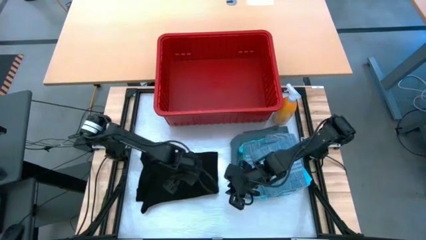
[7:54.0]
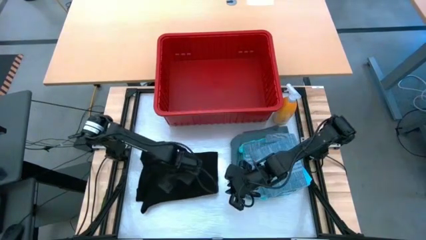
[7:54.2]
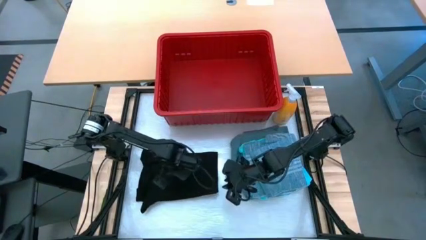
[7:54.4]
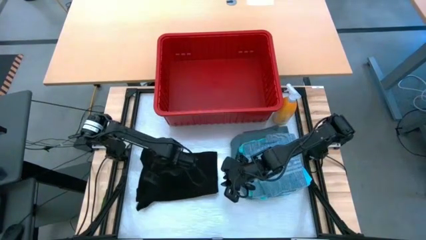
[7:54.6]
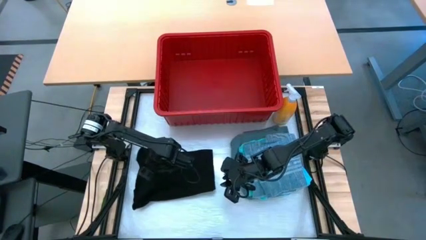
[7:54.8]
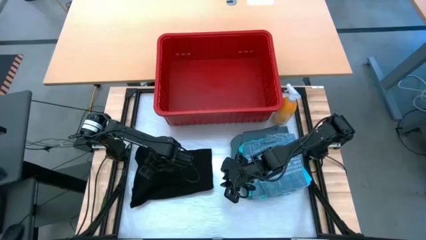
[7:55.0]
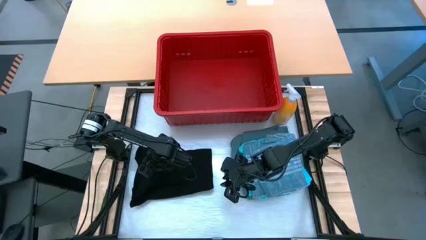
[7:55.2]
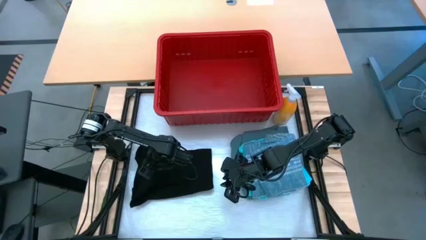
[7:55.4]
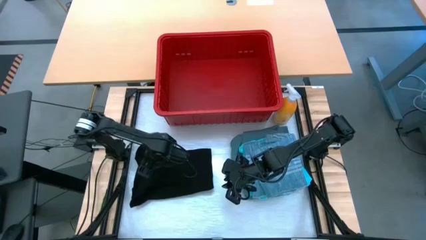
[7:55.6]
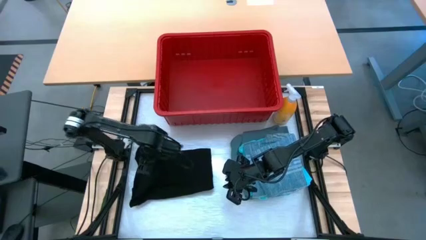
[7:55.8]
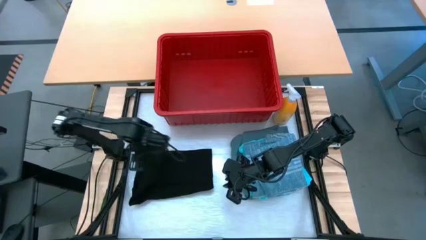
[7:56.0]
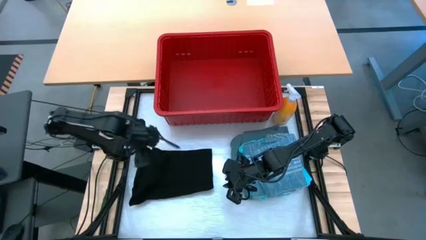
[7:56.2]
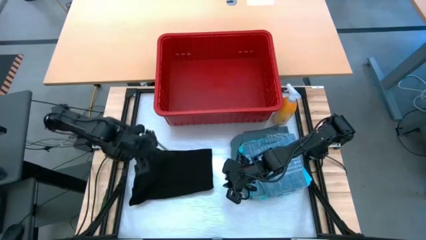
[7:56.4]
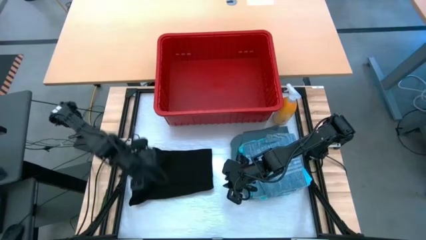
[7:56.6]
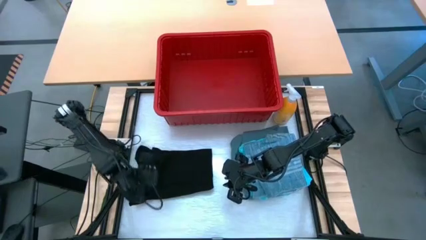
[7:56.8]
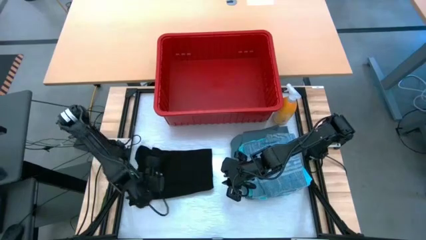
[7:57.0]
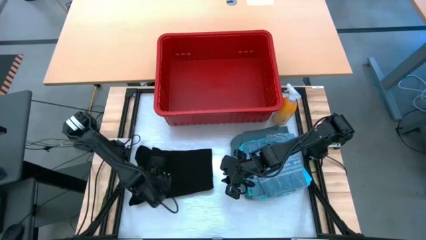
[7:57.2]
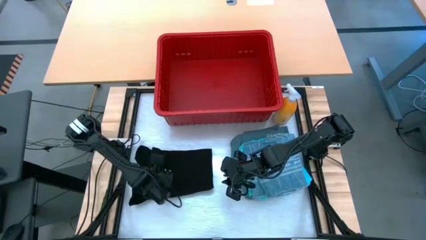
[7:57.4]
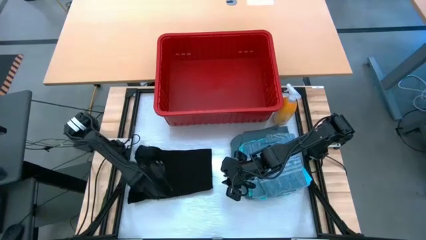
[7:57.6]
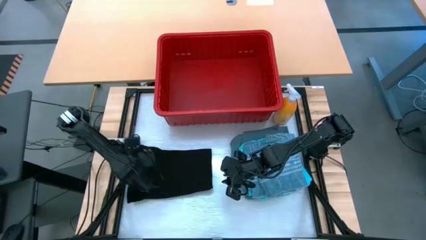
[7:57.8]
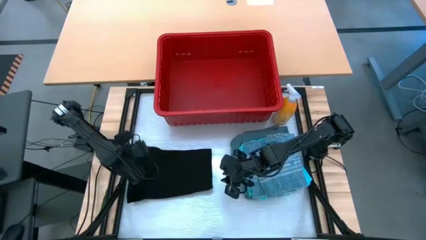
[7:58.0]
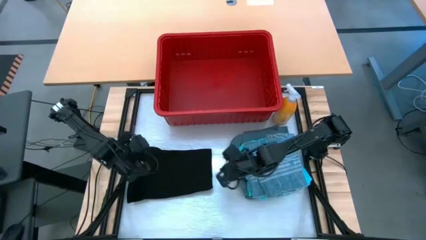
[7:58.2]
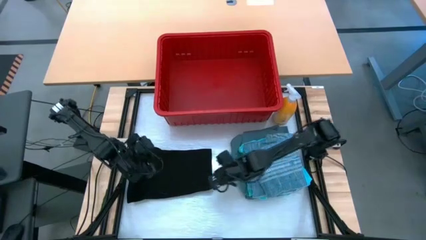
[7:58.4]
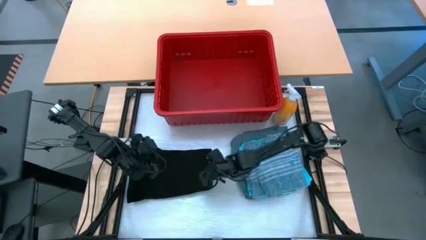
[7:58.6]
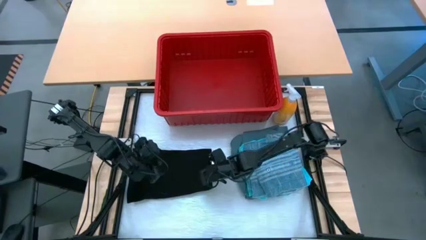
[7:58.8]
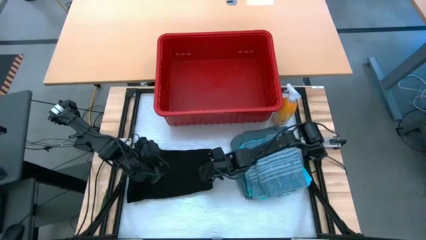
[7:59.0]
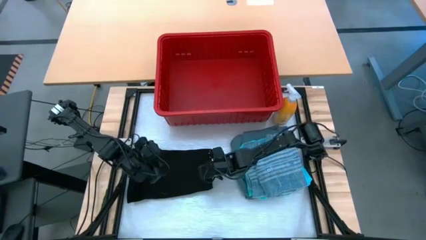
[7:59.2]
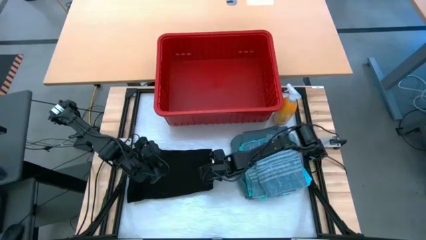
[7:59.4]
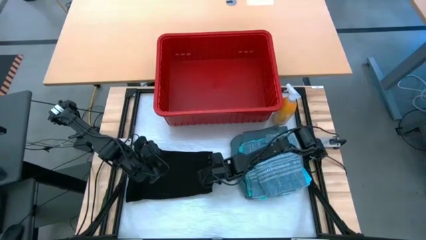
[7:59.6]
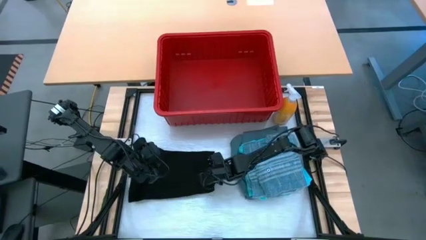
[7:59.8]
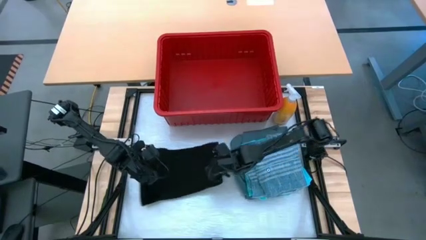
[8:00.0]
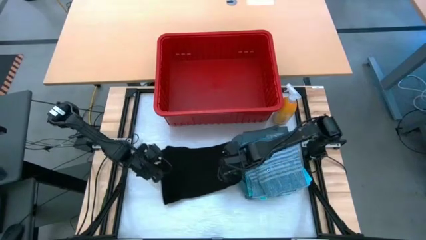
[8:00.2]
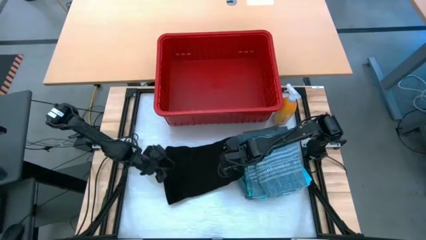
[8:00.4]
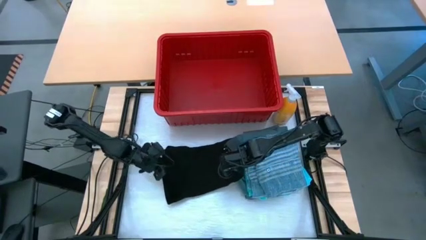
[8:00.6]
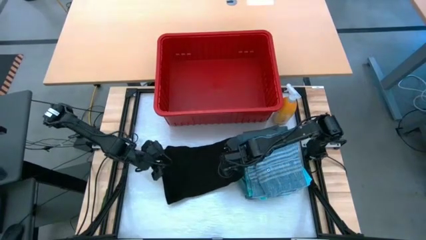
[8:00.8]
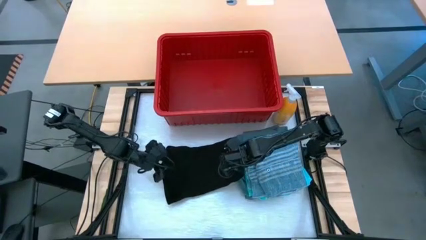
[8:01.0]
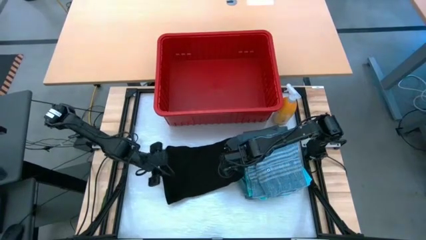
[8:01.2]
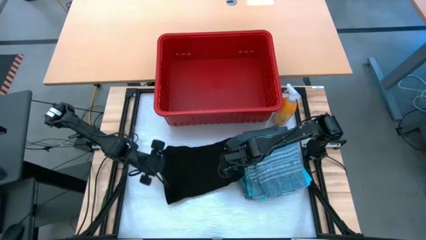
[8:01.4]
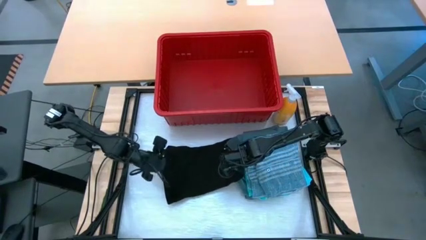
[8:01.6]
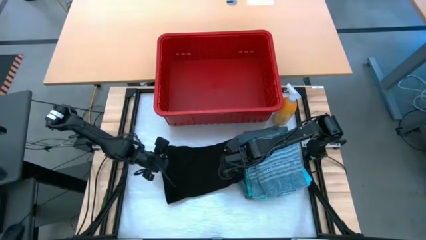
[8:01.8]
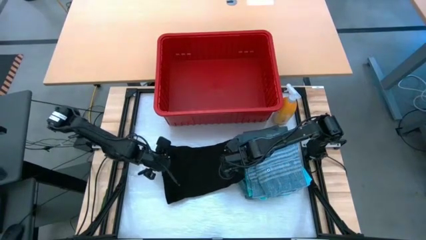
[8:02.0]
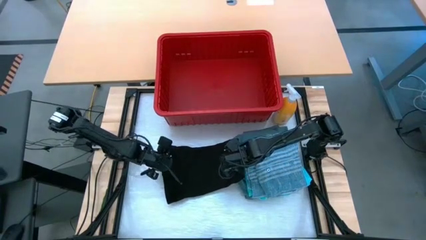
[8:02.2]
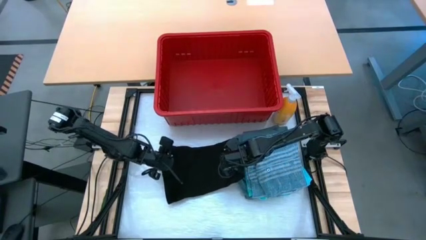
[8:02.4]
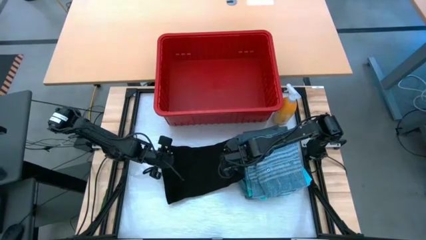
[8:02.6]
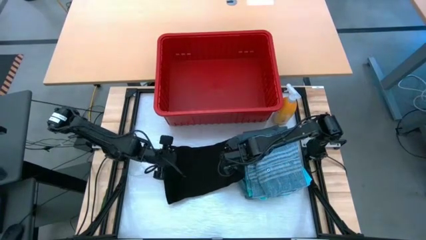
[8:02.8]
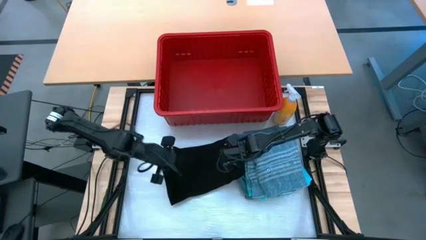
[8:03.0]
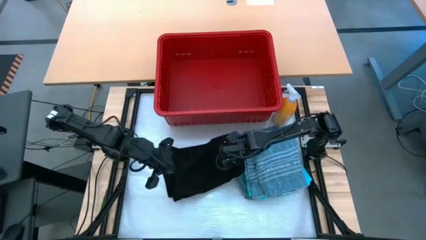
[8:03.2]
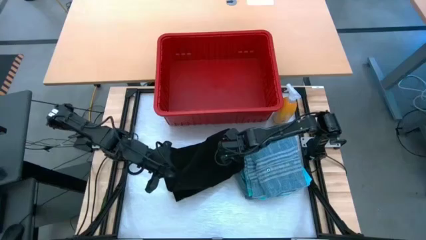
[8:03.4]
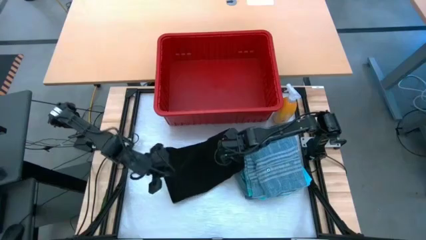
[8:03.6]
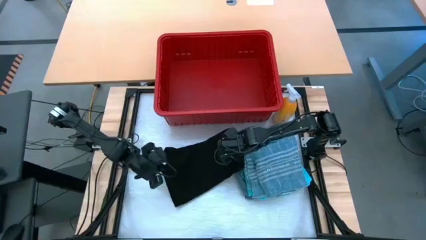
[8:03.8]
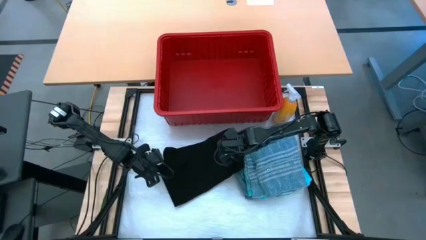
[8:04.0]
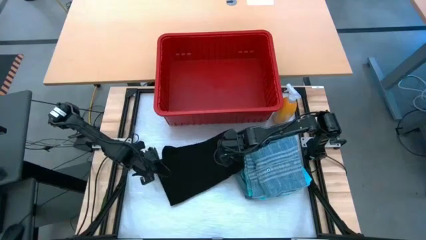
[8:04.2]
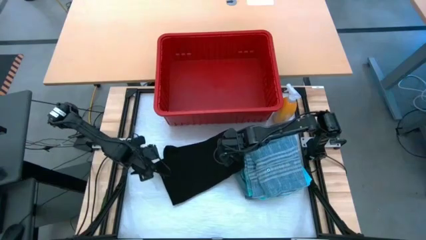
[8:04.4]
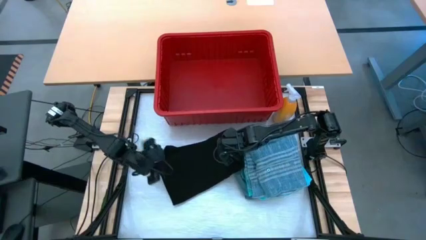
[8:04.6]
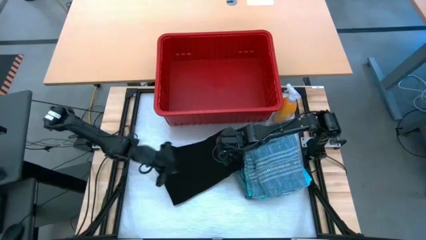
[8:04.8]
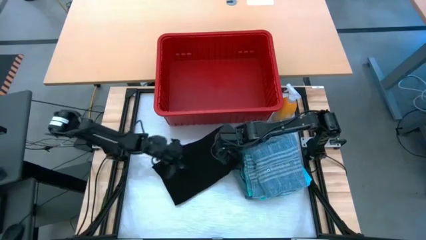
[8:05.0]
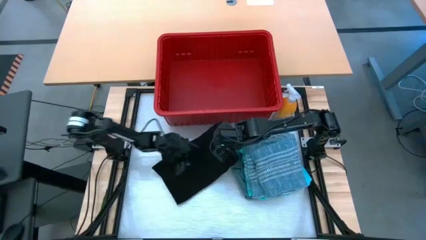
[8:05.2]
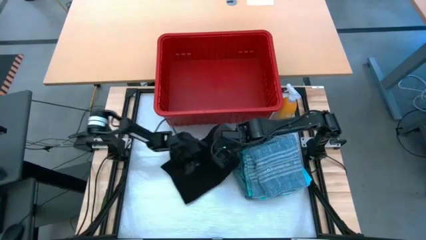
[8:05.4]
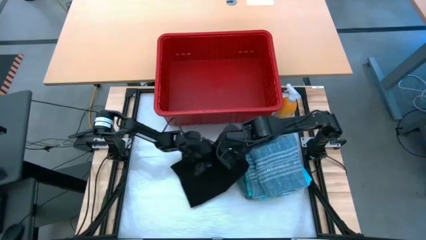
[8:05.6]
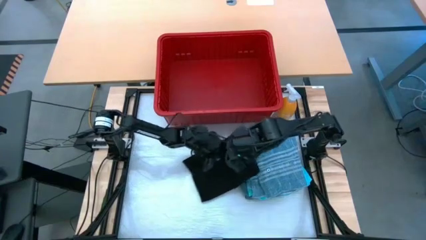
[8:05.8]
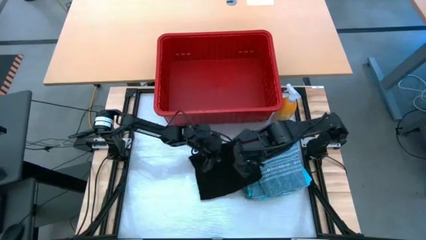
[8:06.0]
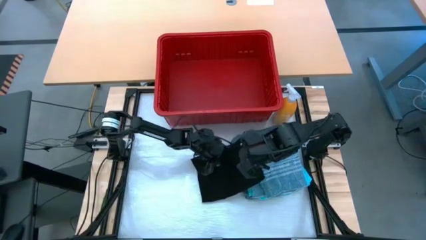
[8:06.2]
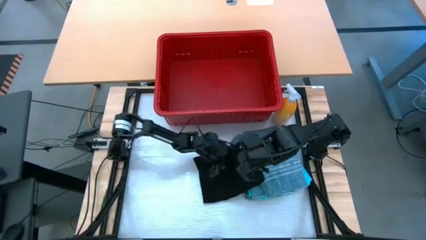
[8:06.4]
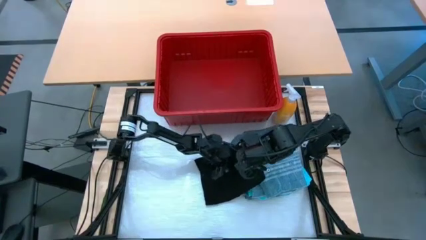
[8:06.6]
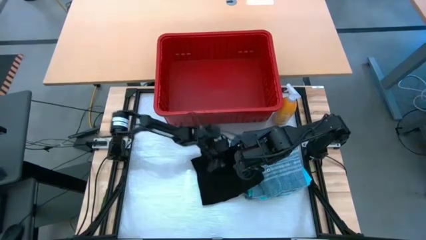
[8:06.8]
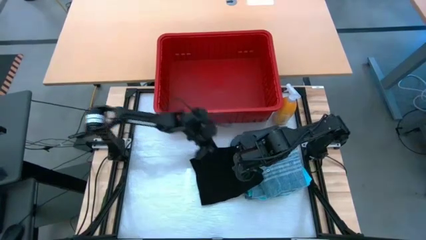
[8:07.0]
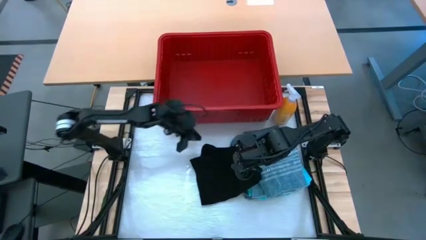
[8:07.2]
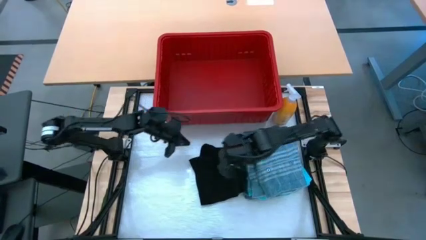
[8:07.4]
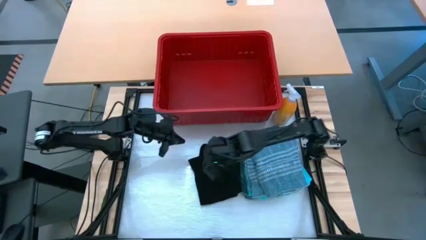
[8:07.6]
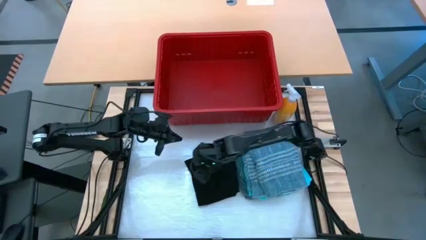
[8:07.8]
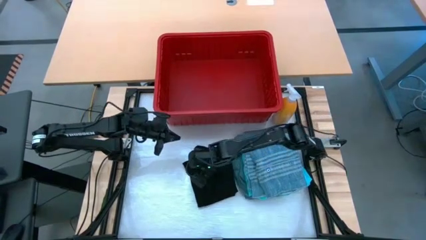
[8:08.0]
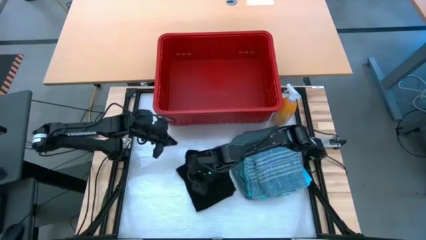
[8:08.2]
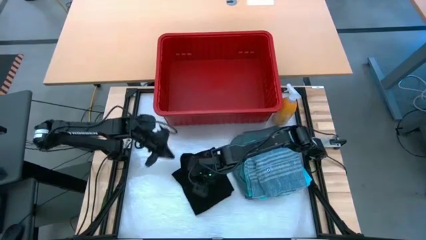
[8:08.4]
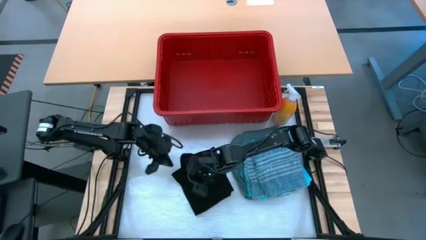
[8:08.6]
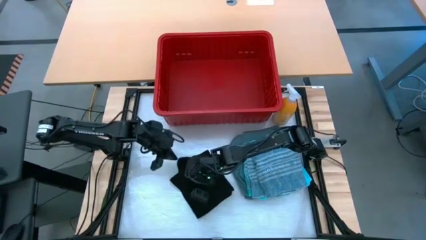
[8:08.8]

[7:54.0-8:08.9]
Task: Fold Laundry from Bin
Fold the black shirt
